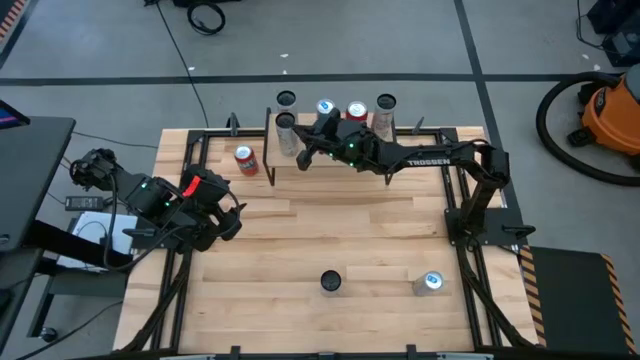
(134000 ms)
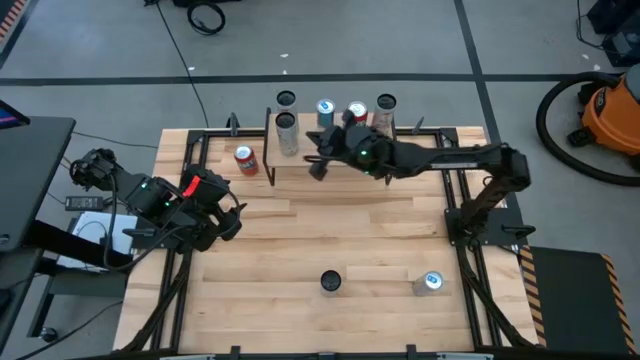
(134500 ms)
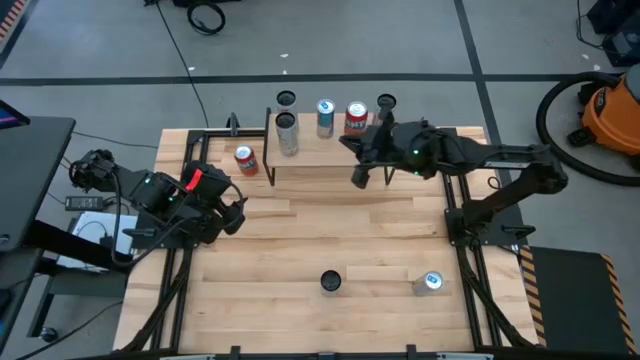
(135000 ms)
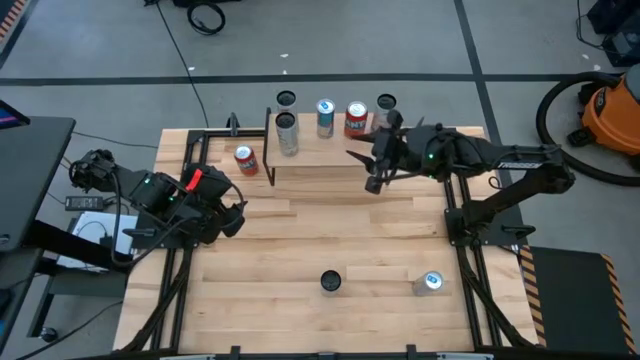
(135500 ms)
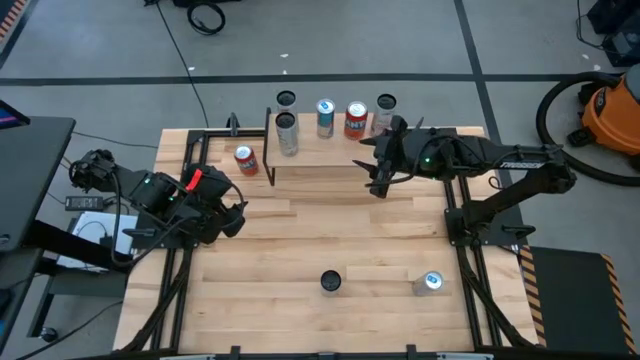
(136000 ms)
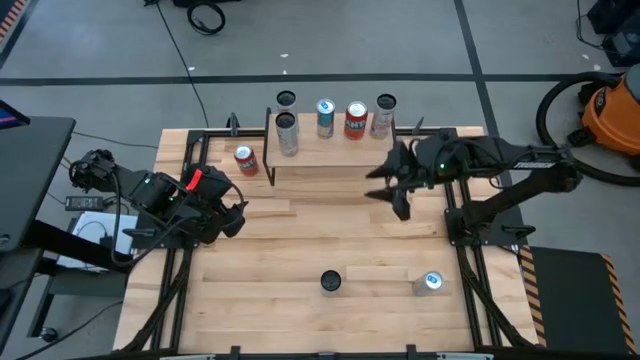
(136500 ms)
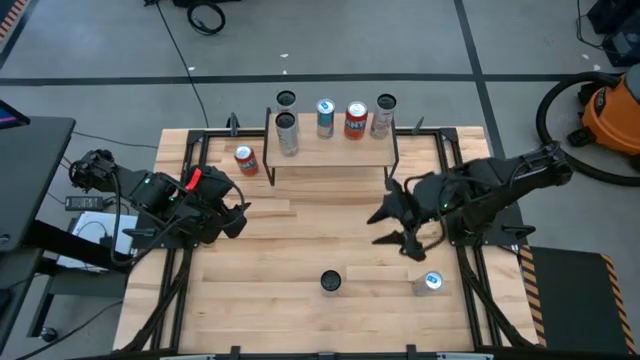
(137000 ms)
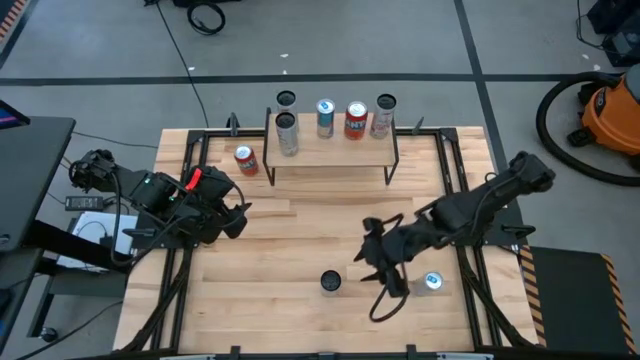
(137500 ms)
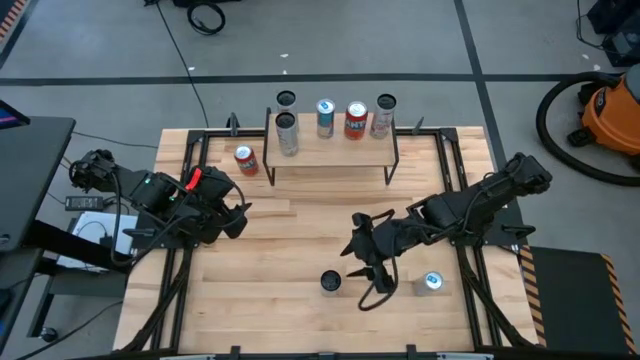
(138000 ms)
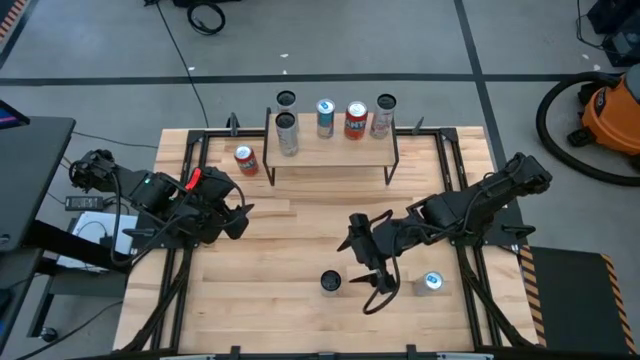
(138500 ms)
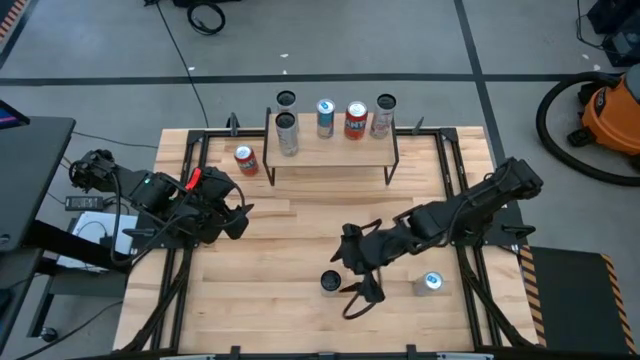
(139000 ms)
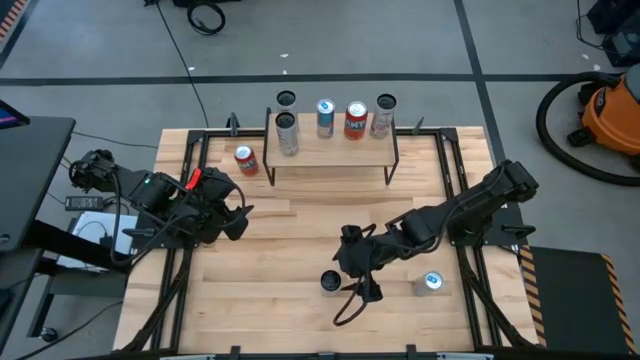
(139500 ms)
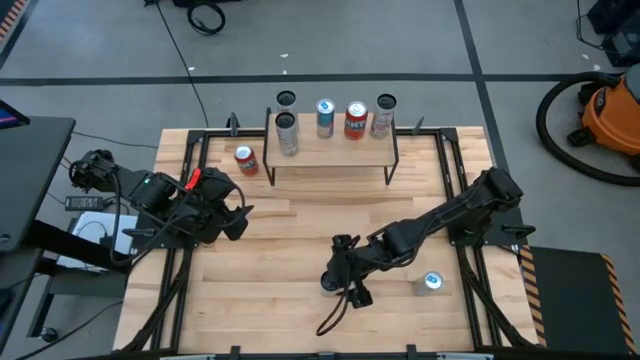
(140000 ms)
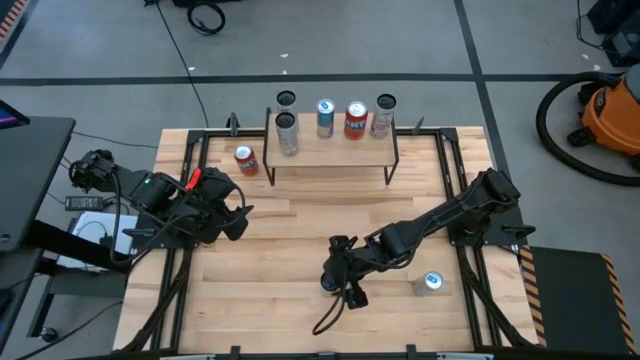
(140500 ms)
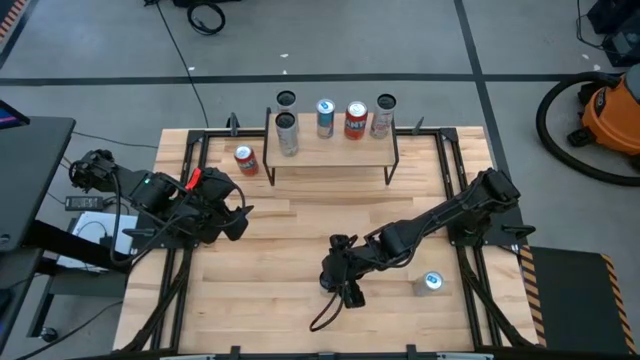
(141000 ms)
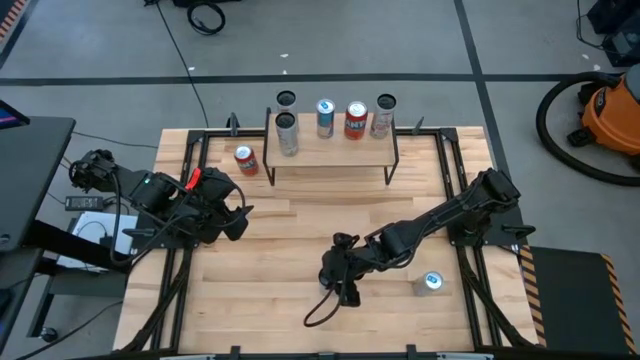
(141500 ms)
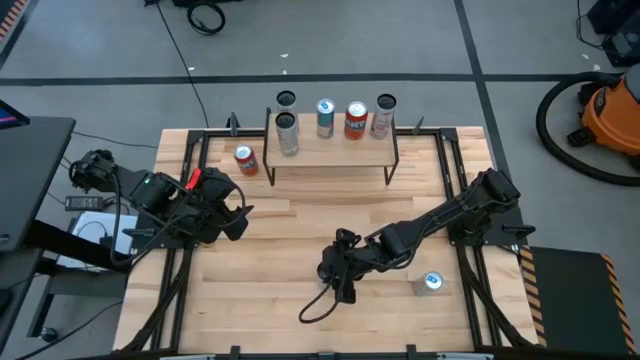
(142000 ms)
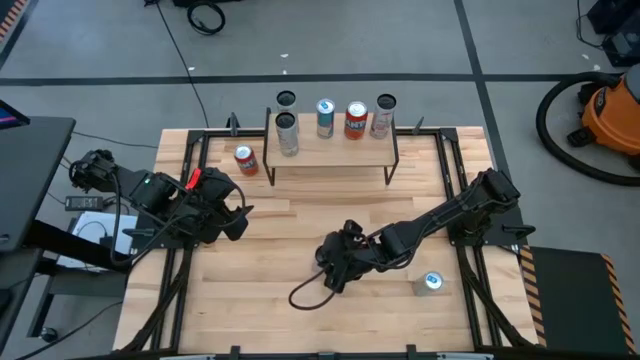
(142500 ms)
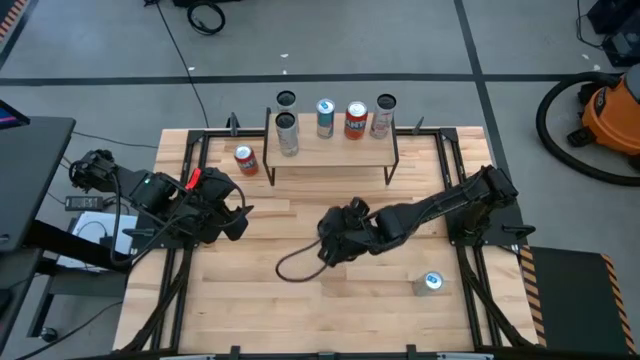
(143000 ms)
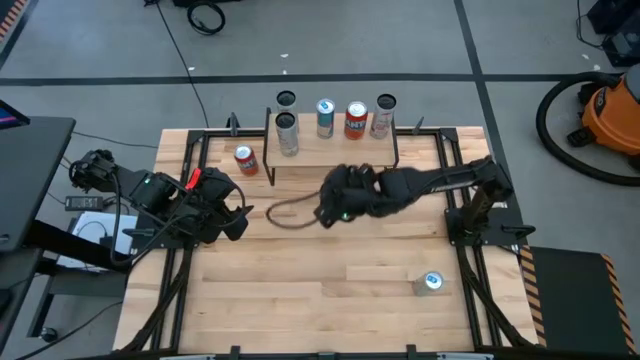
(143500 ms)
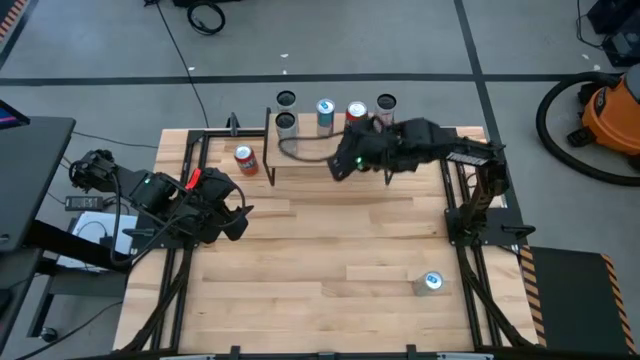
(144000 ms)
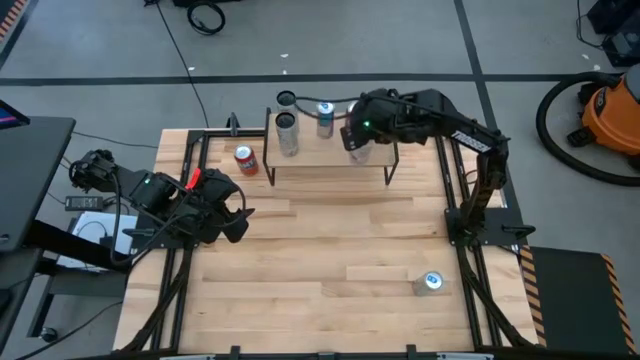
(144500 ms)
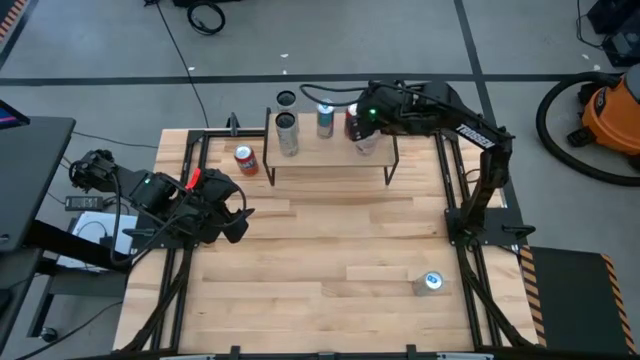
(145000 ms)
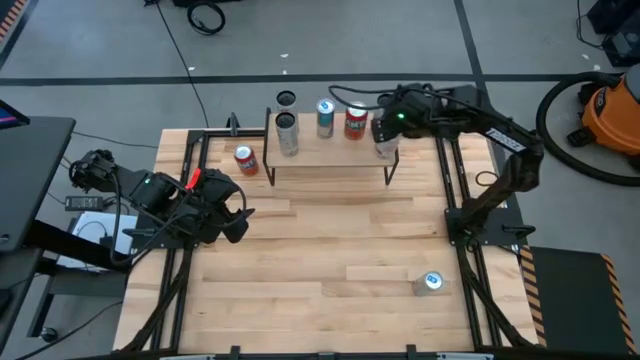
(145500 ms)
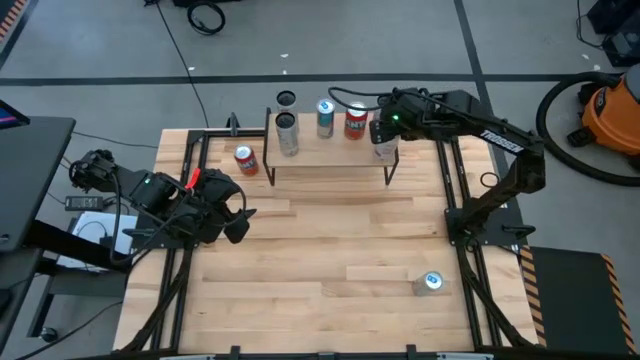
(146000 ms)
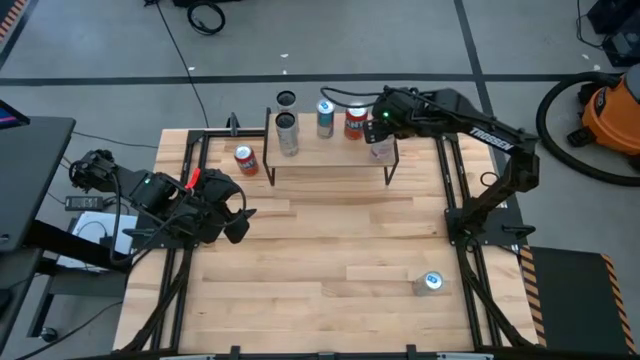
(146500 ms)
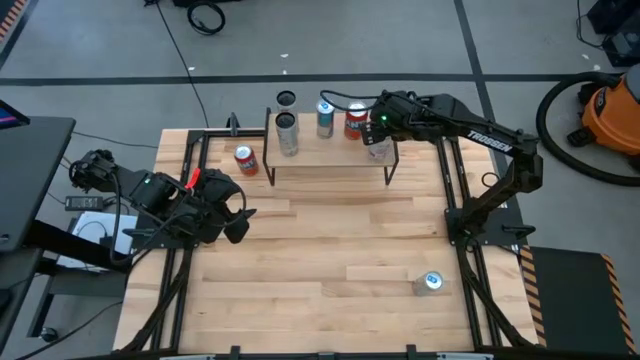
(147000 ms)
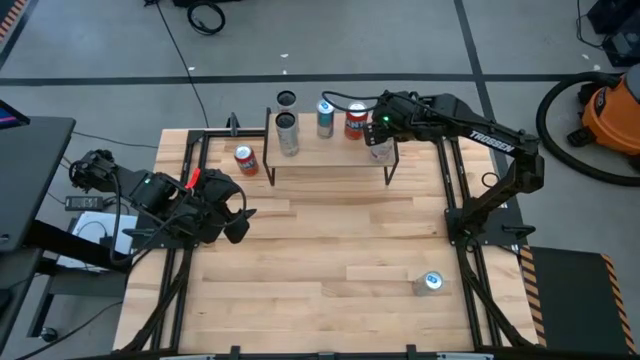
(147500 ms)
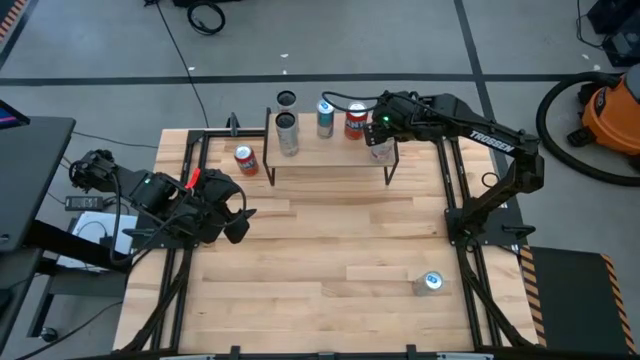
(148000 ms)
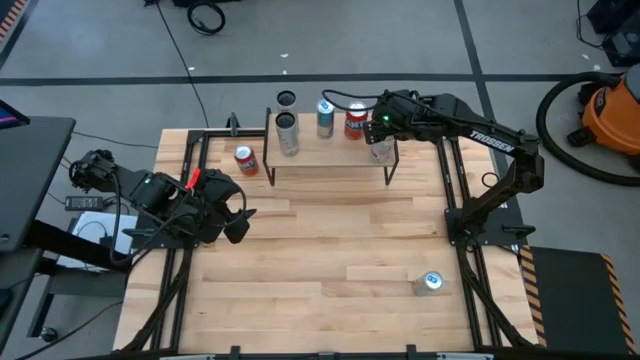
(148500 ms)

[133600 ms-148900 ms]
Task: Place canned beverage on shelf
Put the white pink soda can on the shelf aligned with the other white pink soda can

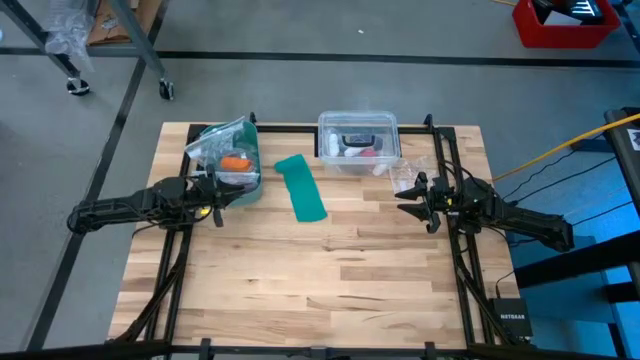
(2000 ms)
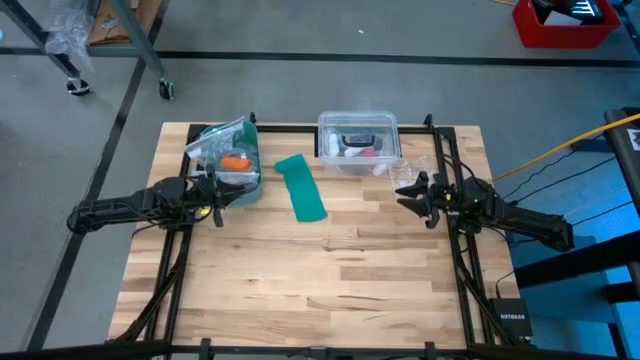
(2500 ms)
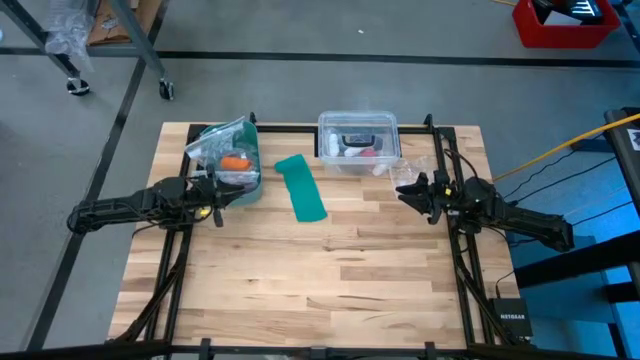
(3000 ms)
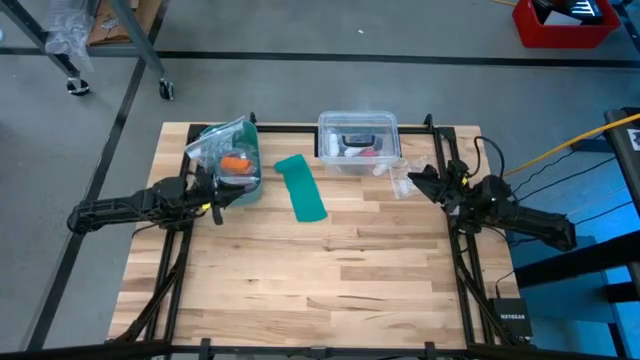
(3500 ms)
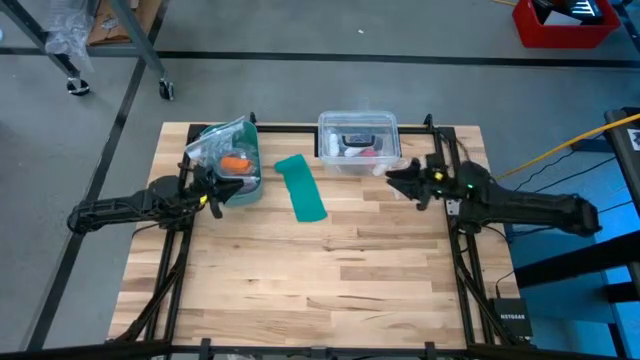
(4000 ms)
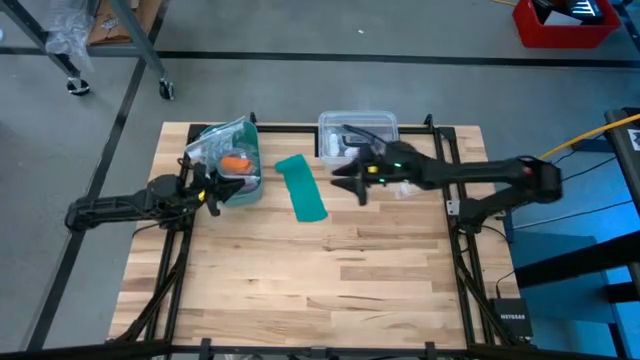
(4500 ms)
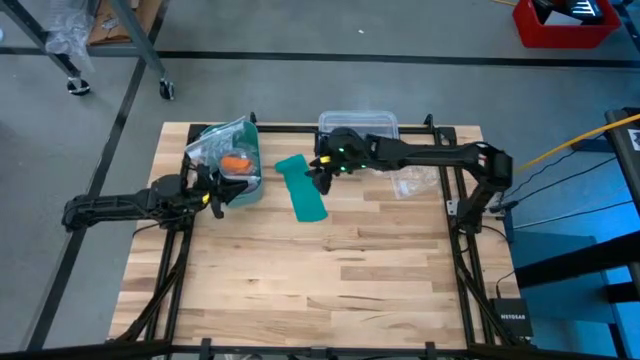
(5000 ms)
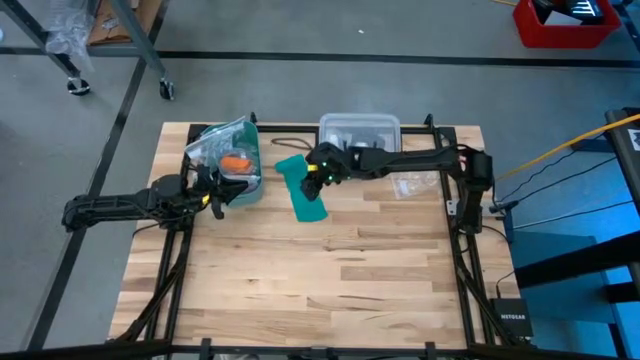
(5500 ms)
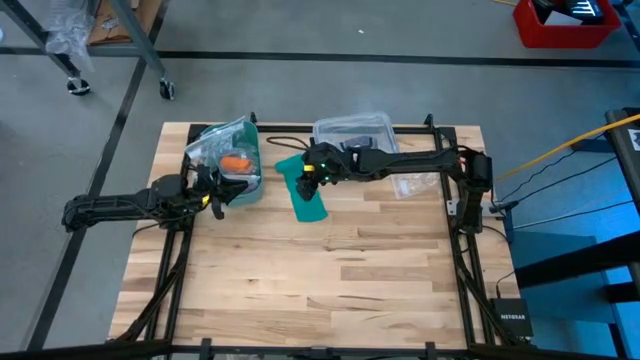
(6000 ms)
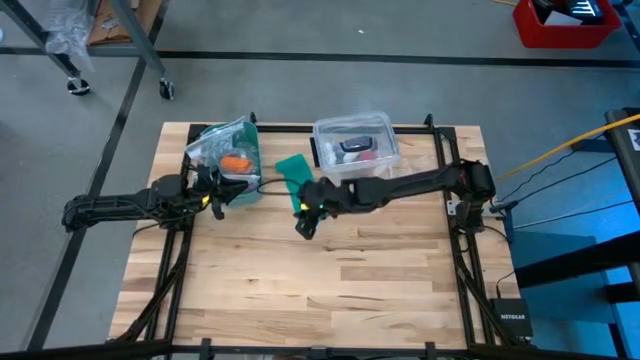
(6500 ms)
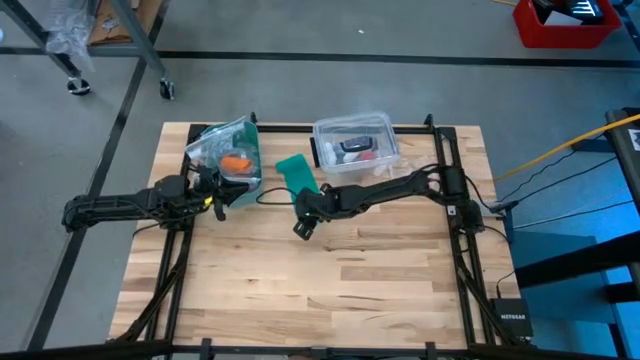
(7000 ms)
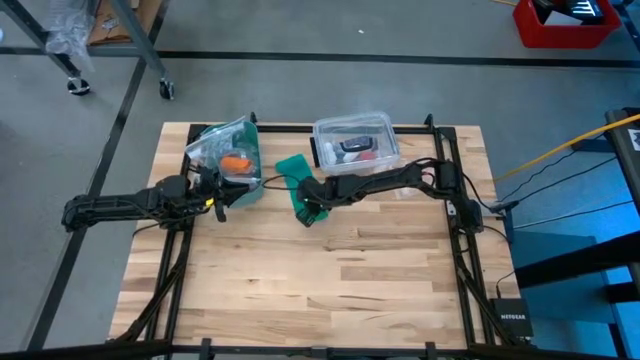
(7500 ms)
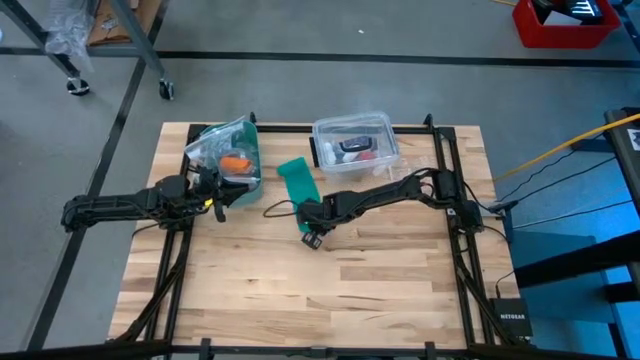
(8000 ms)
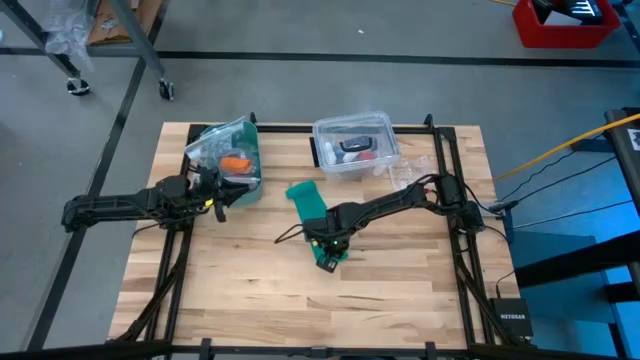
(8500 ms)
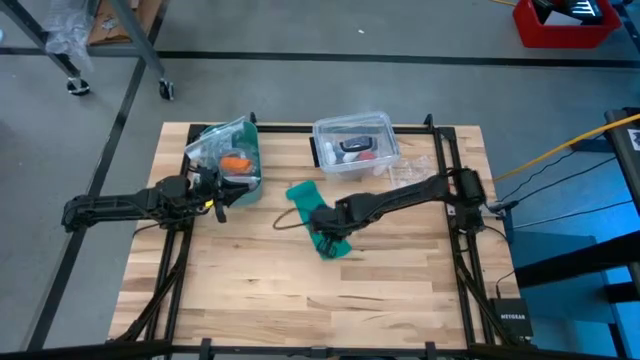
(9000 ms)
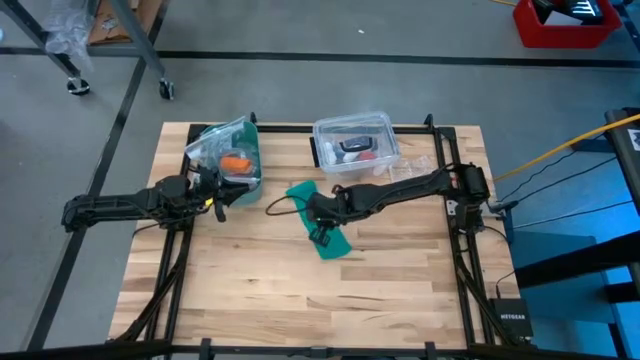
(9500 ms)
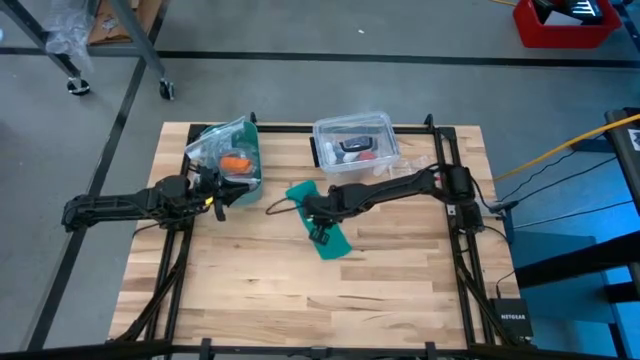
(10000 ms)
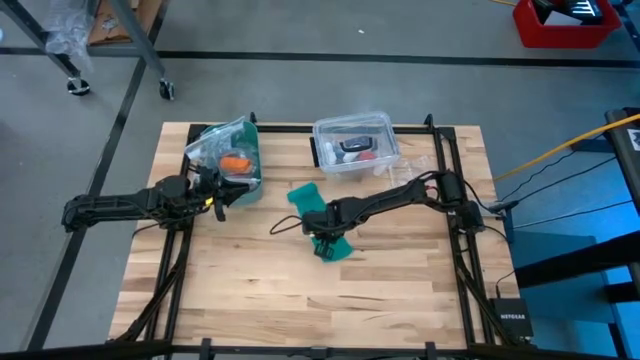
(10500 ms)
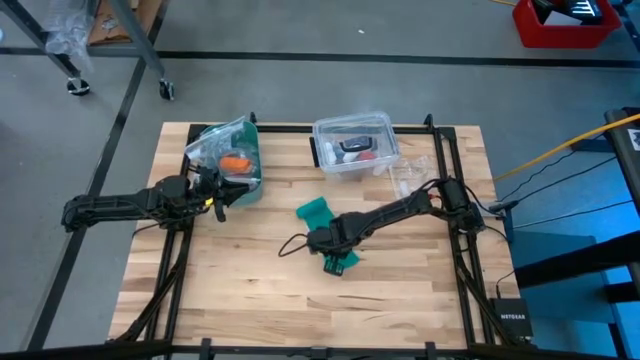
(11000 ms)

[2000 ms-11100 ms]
Task: Roll bandage
Move the green bandage to the center of the table
